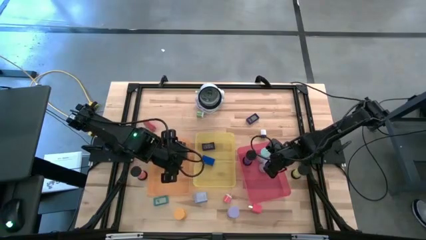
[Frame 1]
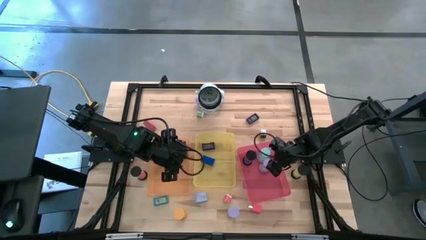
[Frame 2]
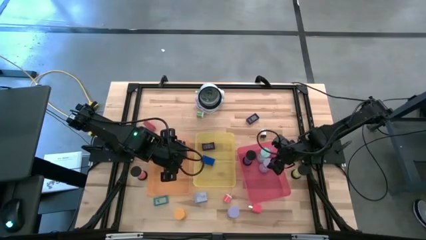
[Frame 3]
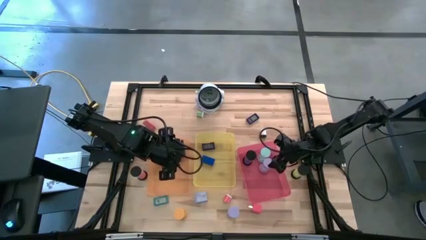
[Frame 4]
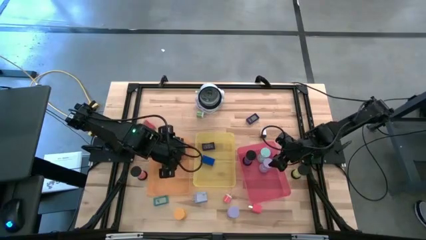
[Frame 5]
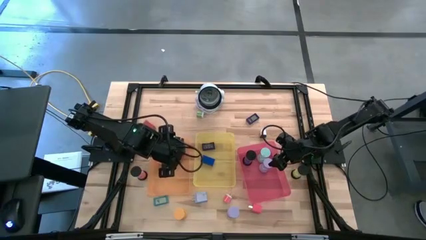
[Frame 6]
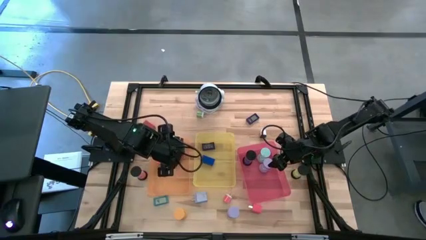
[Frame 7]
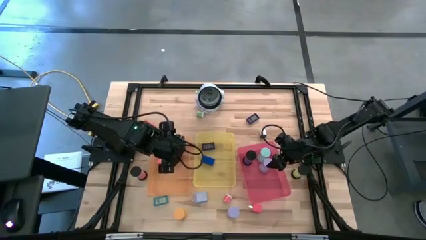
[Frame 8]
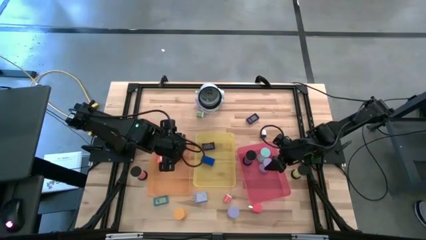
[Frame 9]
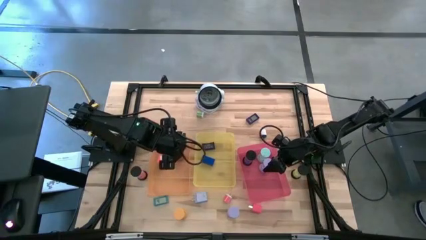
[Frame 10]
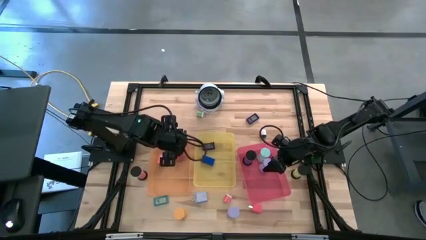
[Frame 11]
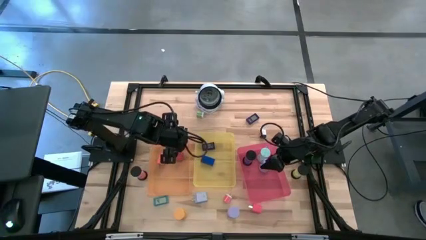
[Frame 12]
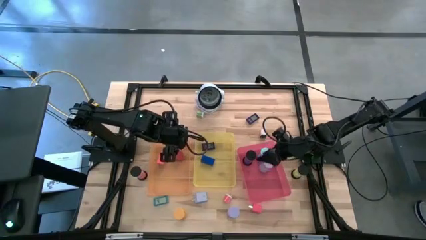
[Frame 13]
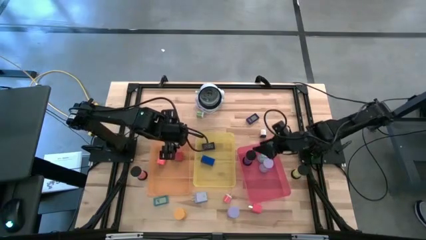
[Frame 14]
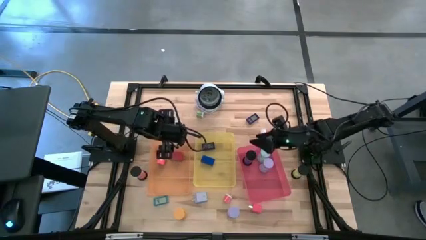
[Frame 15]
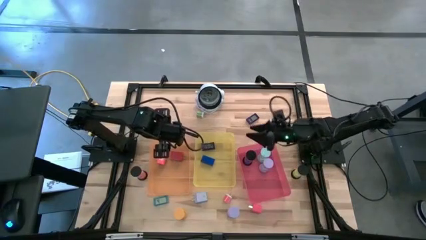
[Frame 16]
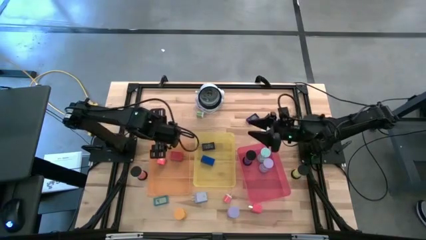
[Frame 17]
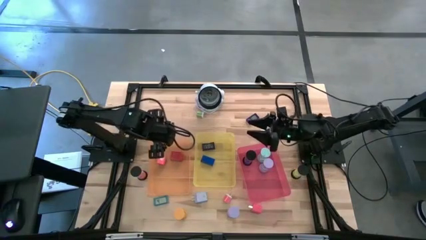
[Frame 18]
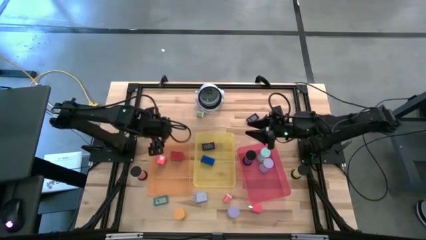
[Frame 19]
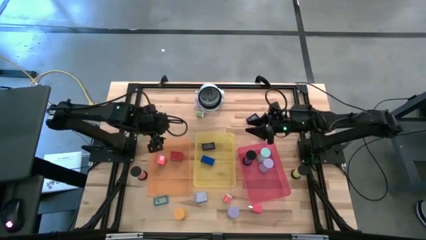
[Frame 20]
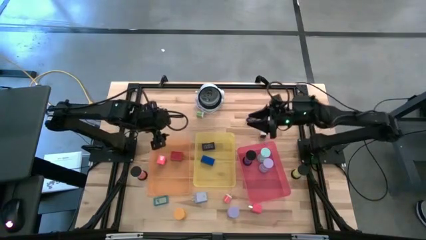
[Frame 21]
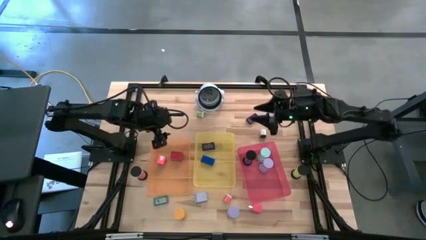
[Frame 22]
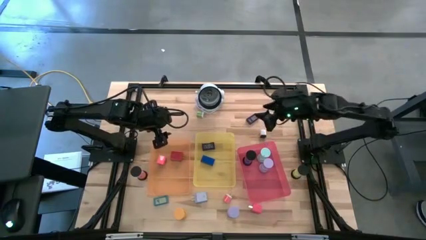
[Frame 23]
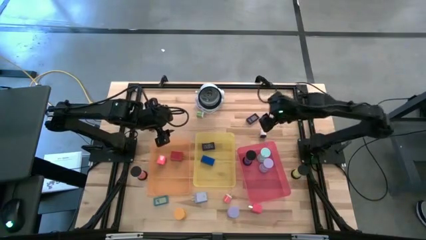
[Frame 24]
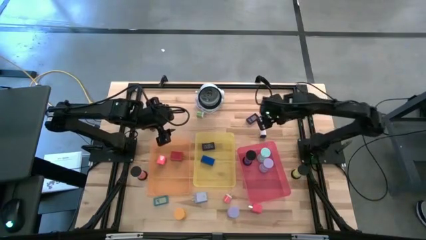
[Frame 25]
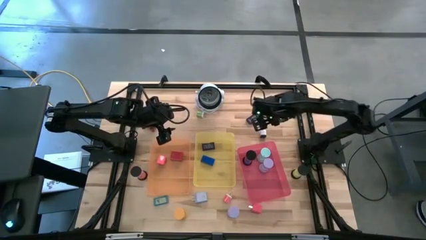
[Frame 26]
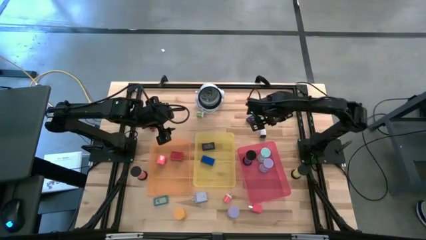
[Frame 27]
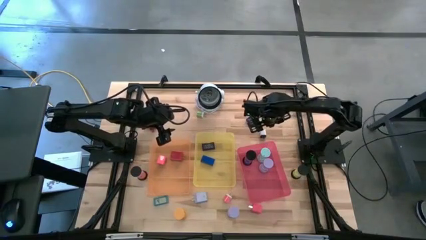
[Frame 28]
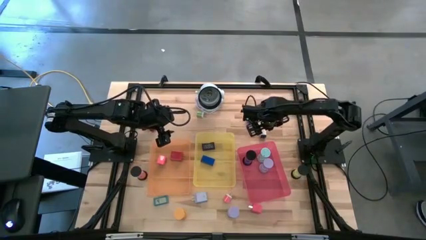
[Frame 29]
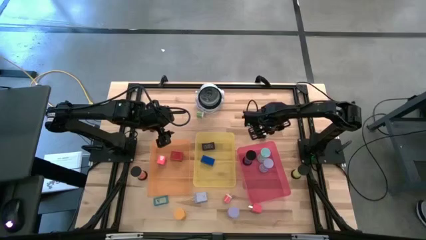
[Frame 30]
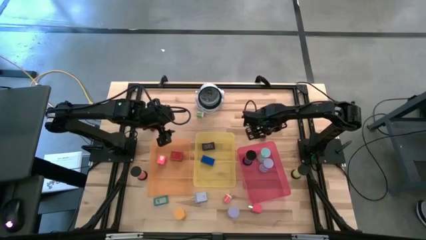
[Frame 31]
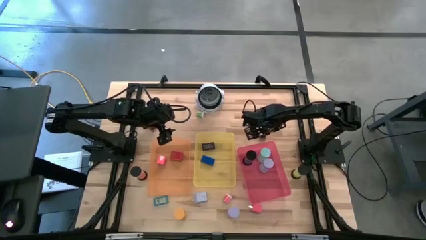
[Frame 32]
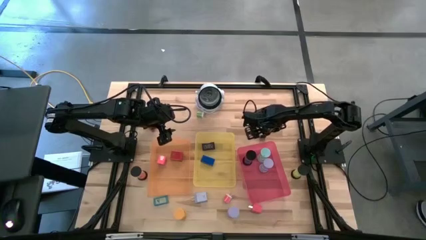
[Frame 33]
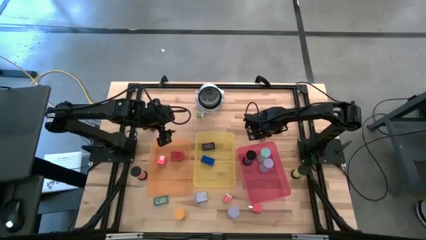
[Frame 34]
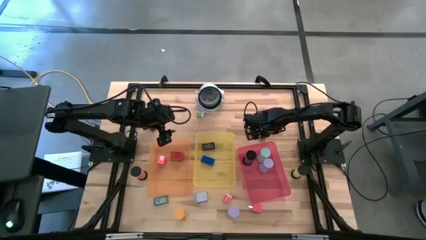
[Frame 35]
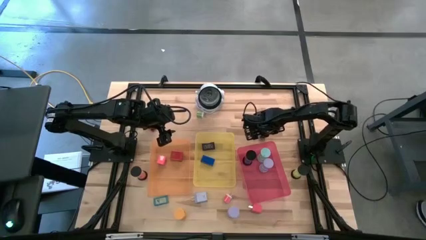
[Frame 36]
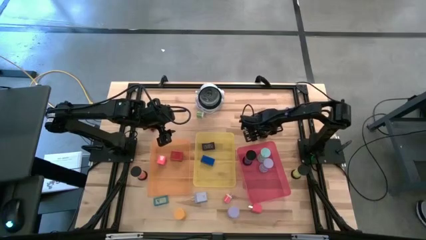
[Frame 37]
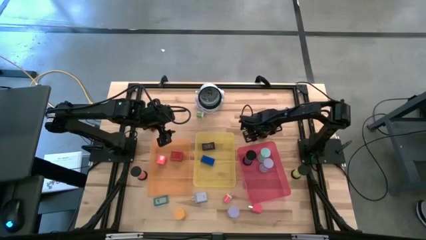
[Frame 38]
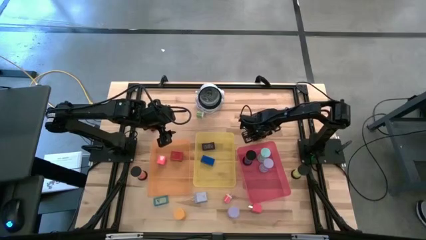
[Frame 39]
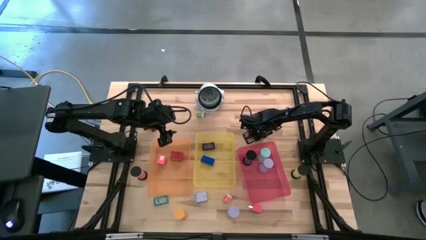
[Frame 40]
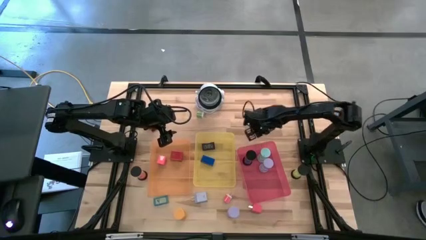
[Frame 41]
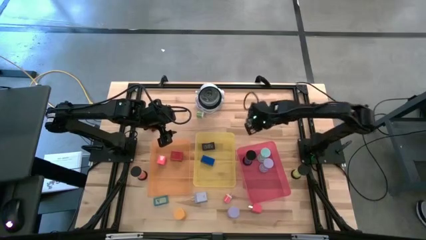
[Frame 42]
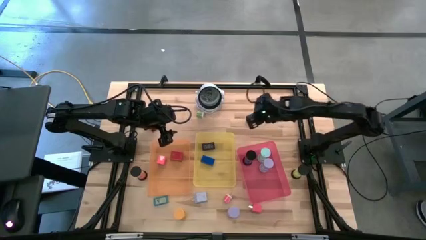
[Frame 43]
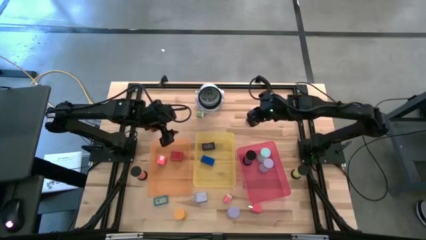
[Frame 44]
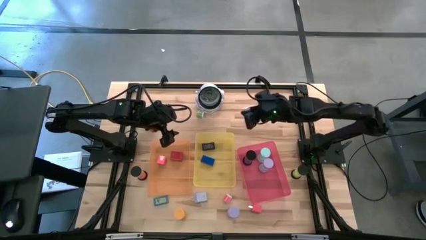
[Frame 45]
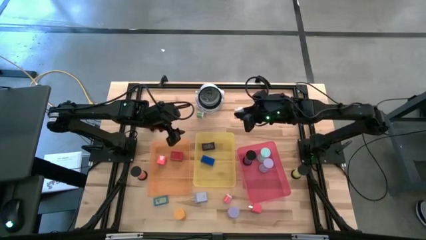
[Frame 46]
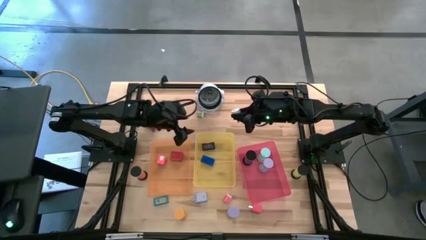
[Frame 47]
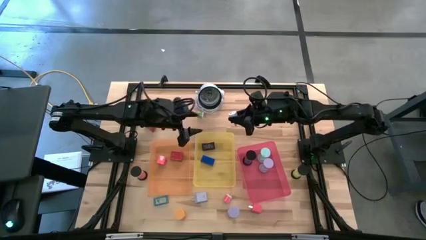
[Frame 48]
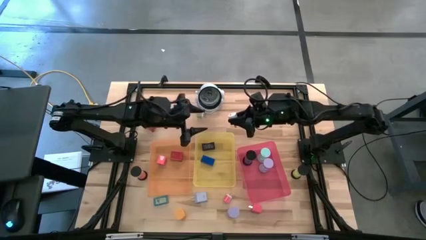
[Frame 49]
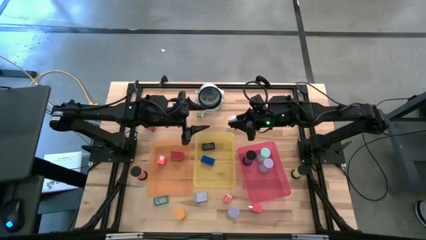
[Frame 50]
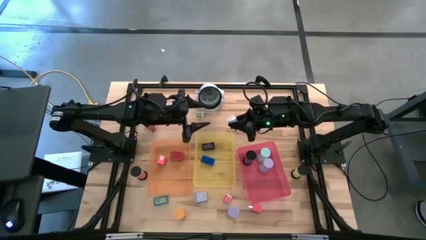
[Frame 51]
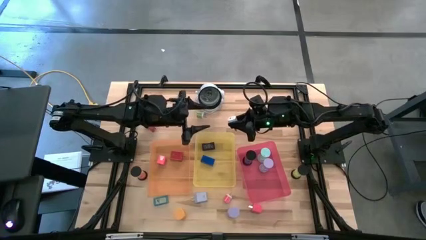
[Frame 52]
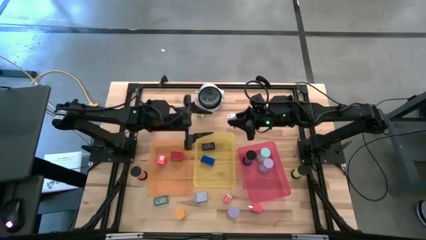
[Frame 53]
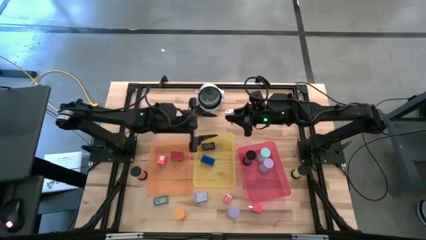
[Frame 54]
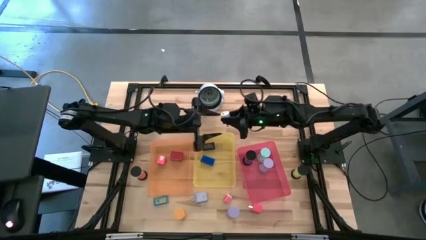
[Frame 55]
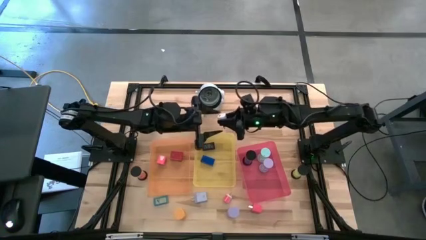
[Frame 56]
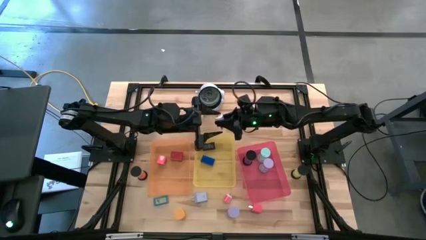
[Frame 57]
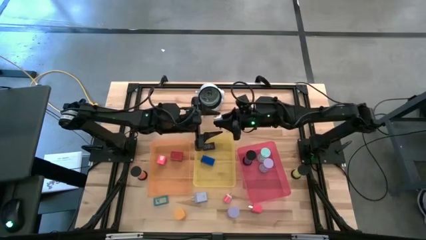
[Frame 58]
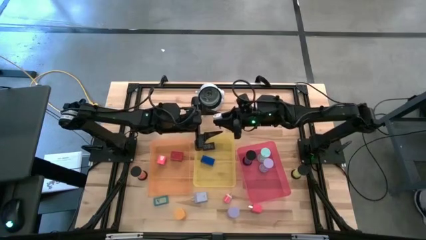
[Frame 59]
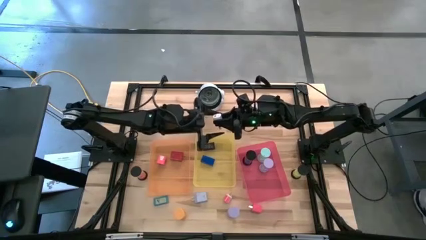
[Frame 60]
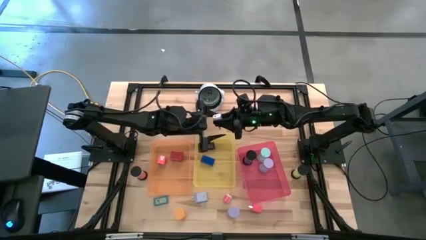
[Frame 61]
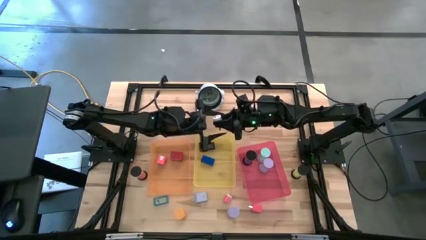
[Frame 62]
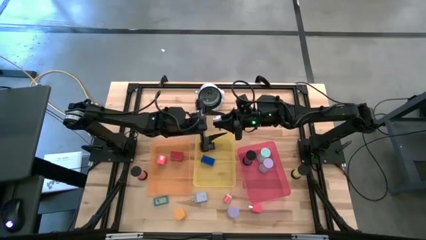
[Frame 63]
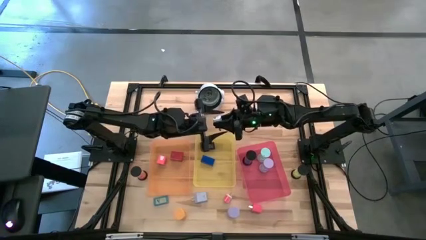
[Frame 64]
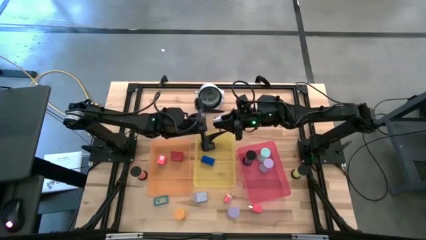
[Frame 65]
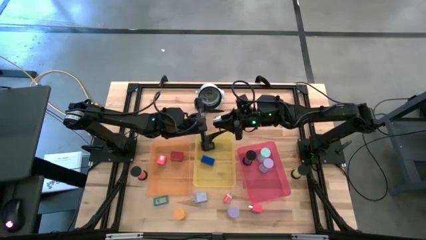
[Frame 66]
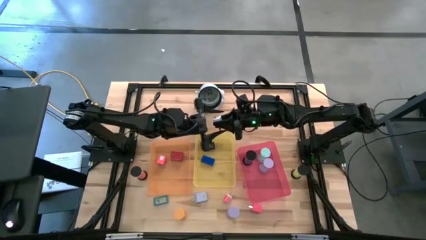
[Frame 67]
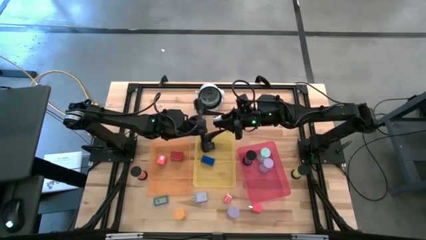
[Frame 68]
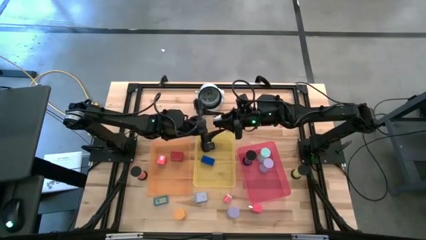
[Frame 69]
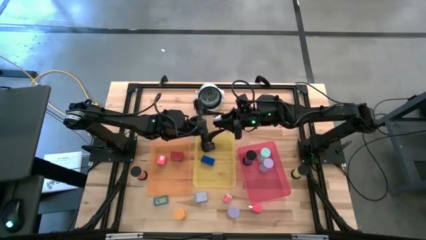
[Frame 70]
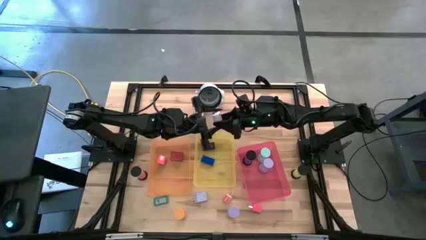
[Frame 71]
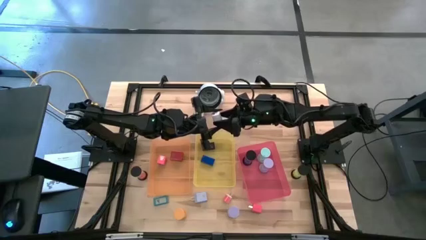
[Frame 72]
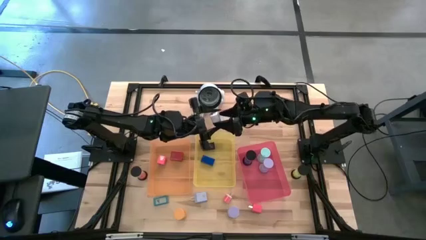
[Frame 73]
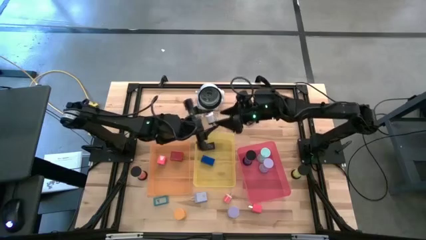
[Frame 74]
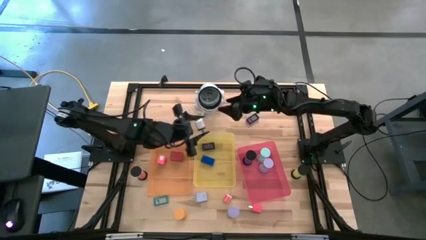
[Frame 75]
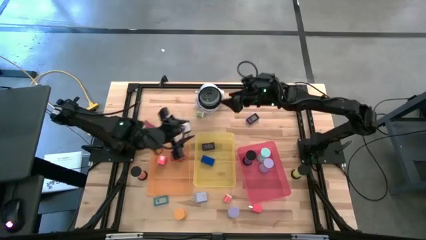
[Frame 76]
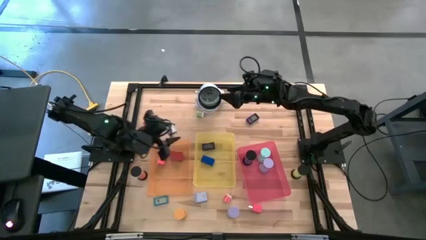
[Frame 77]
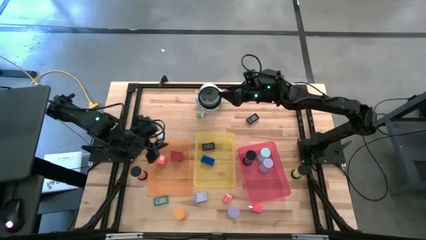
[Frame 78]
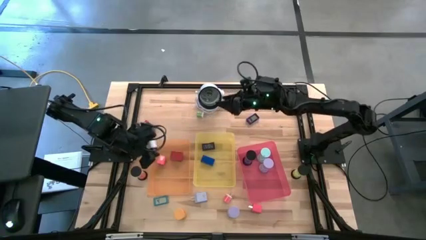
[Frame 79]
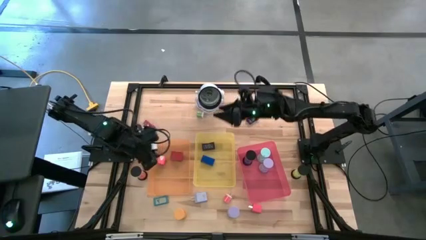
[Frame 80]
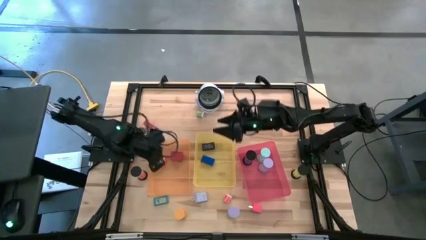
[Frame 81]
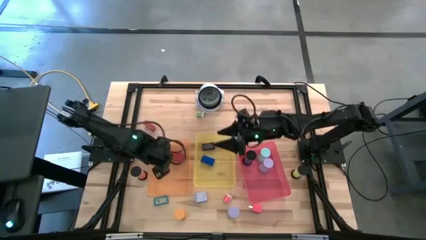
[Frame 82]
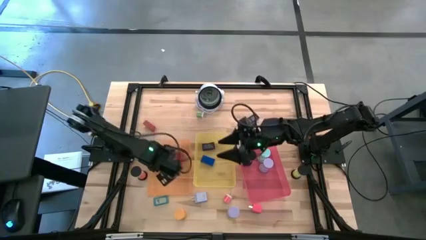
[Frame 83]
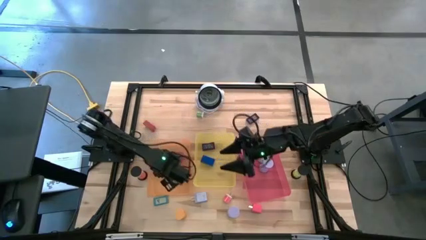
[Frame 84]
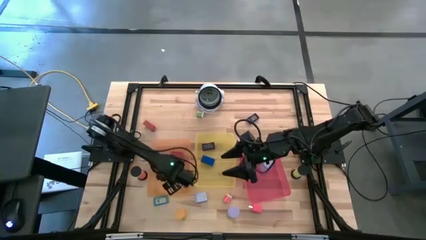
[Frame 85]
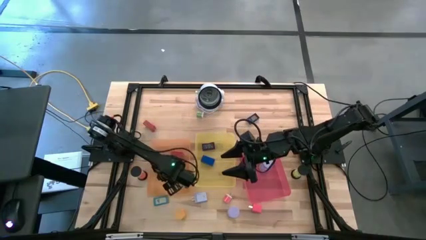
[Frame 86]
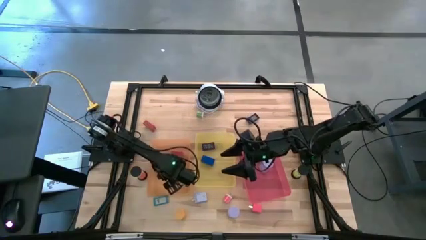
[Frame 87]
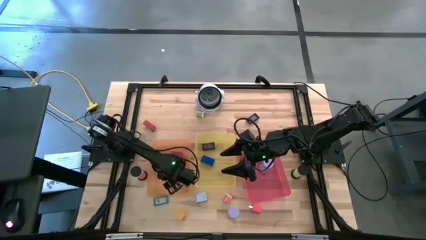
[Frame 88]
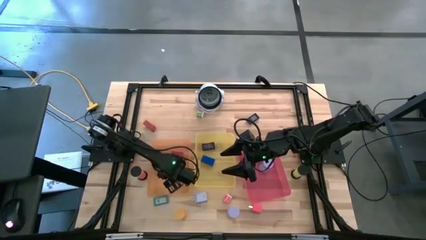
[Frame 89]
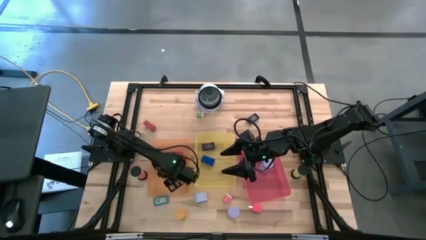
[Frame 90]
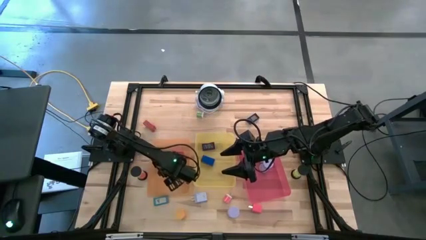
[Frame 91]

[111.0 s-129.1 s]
Task: Pick & Place Office items
Put the white charger adaptor into the orange bin
